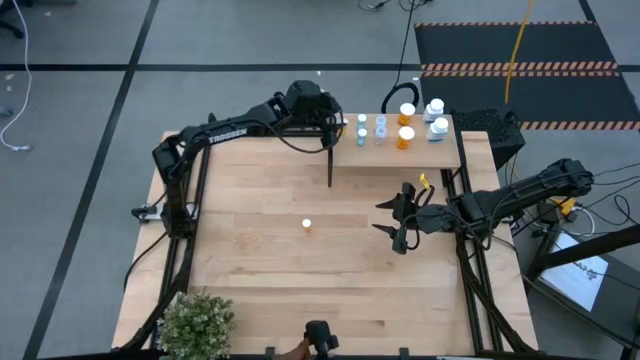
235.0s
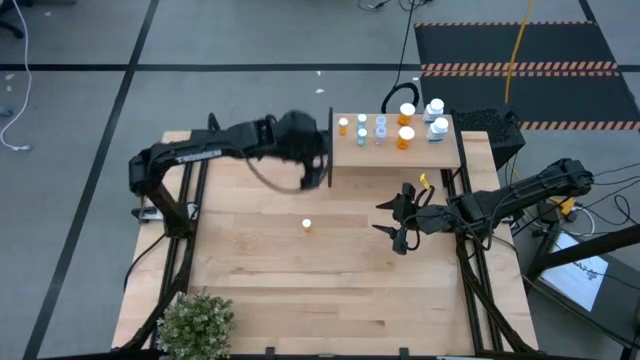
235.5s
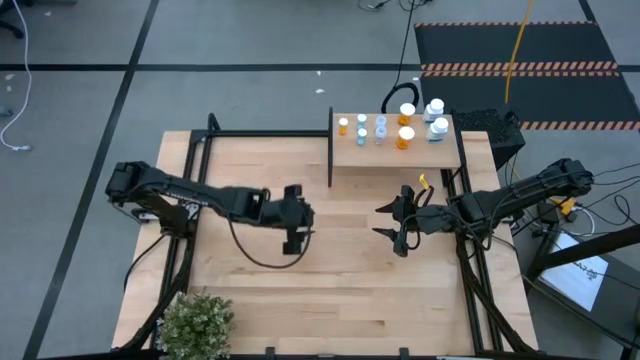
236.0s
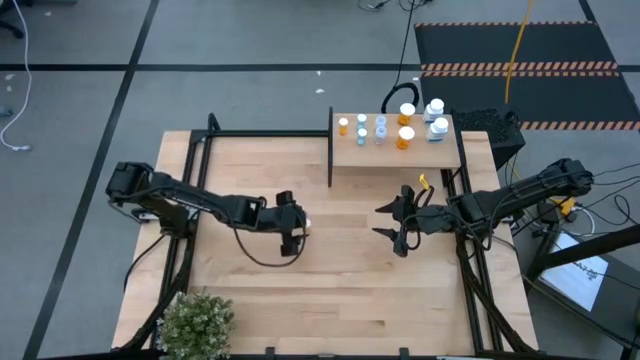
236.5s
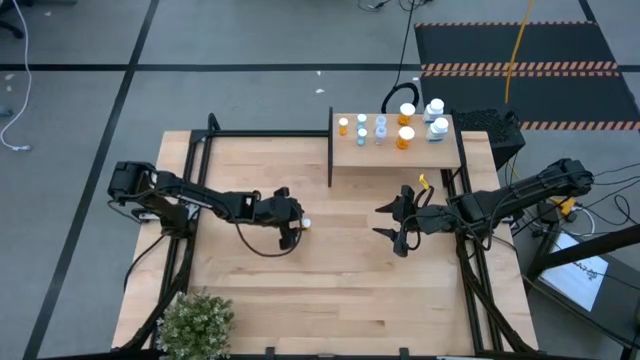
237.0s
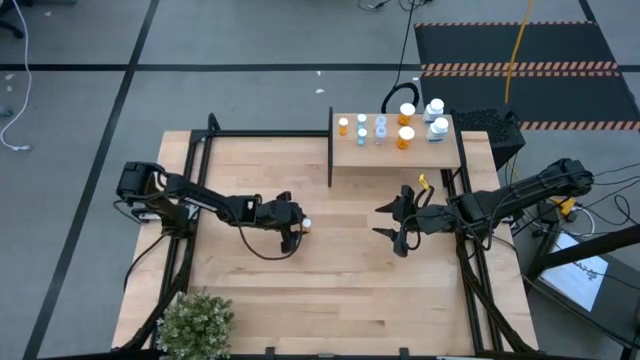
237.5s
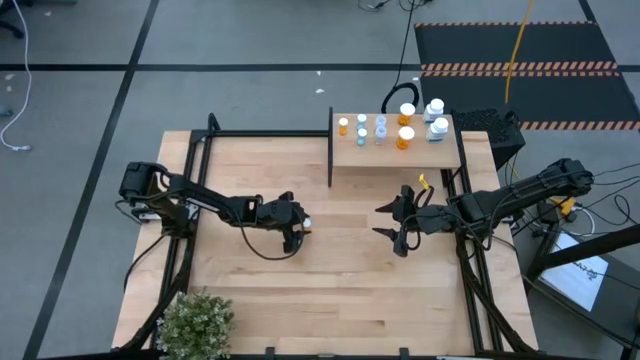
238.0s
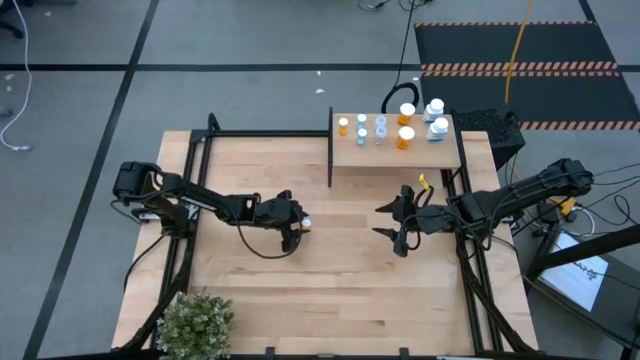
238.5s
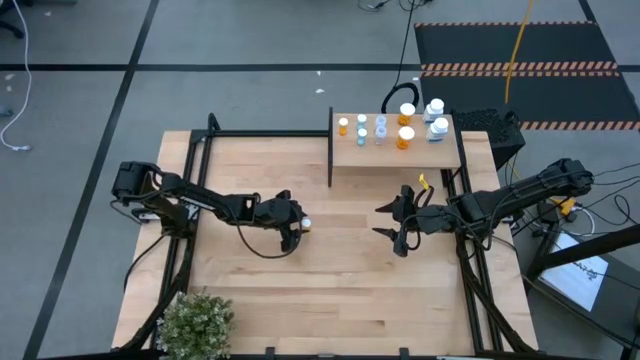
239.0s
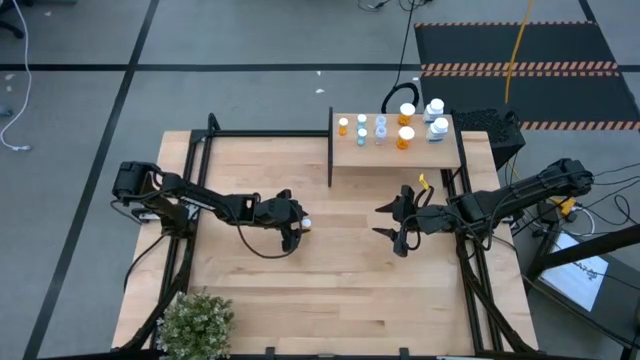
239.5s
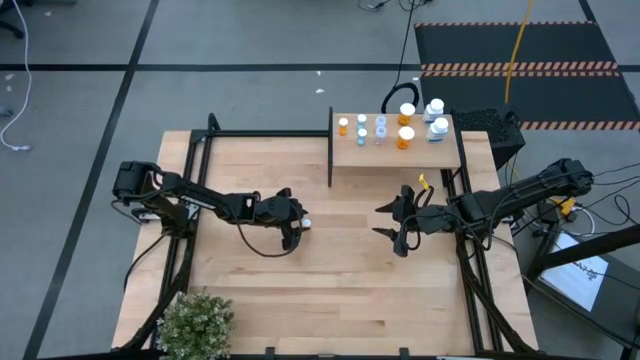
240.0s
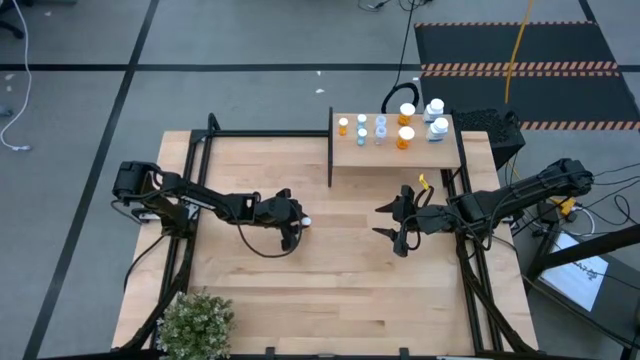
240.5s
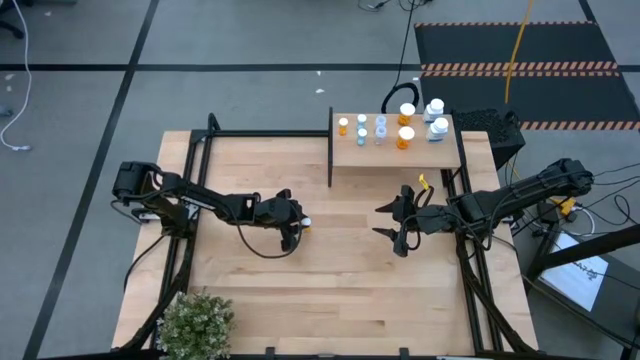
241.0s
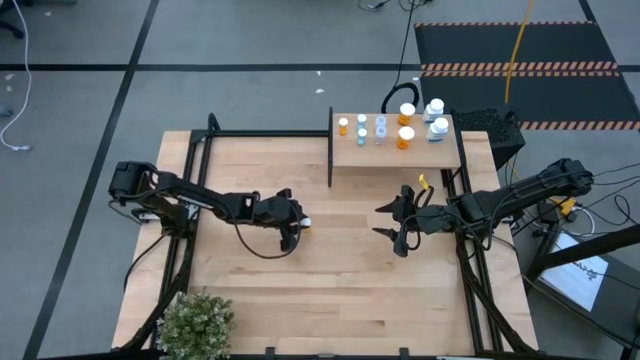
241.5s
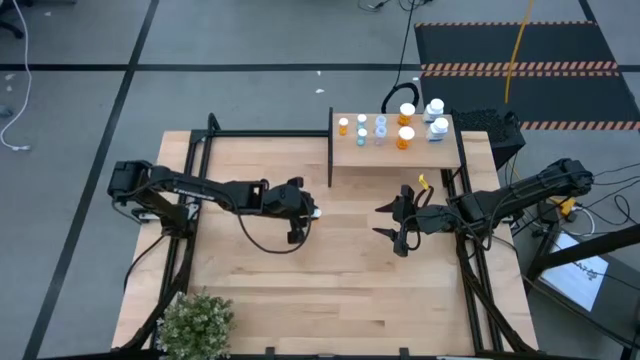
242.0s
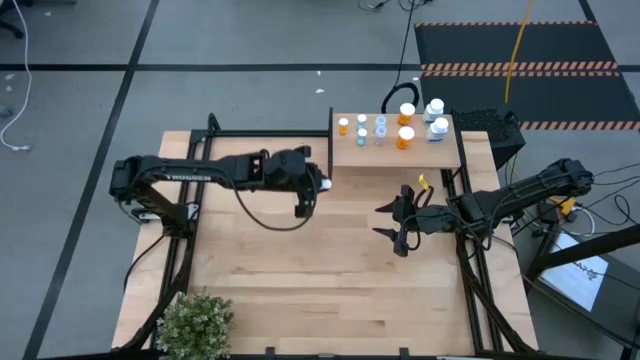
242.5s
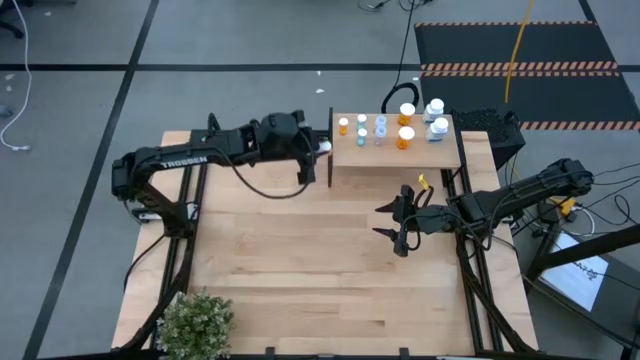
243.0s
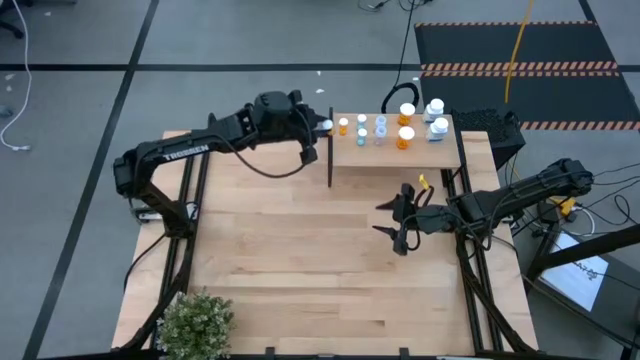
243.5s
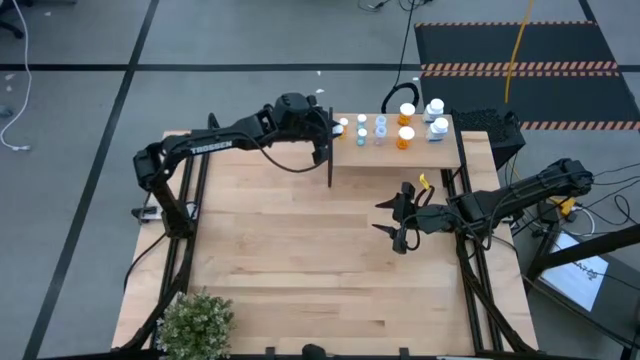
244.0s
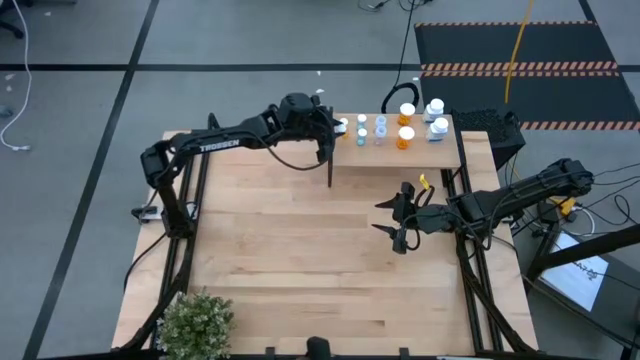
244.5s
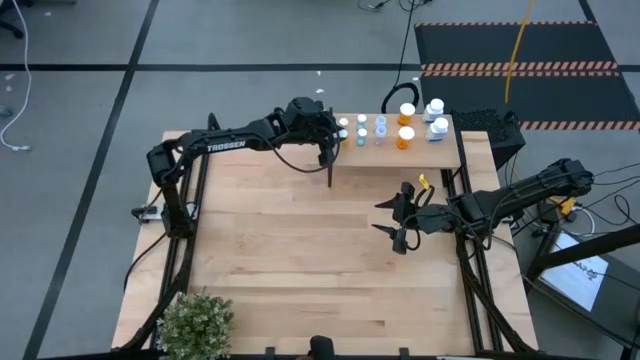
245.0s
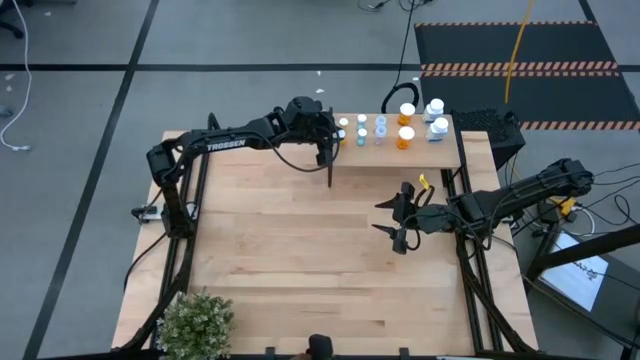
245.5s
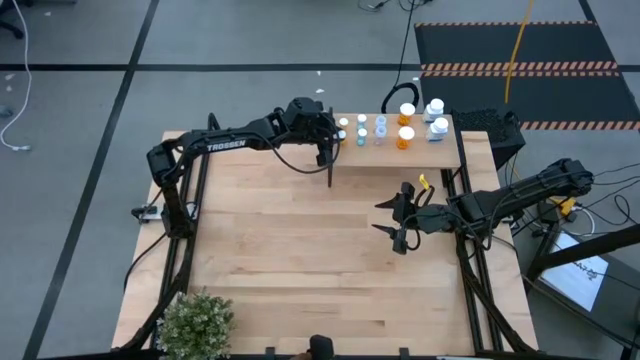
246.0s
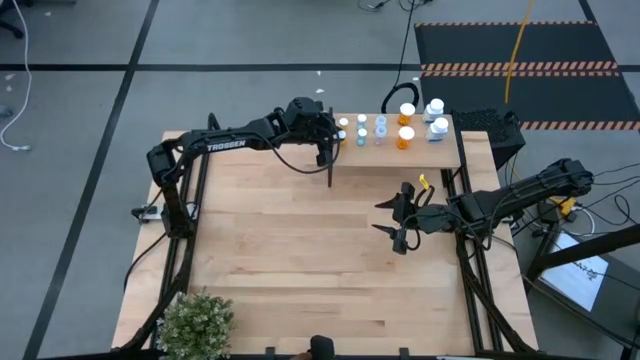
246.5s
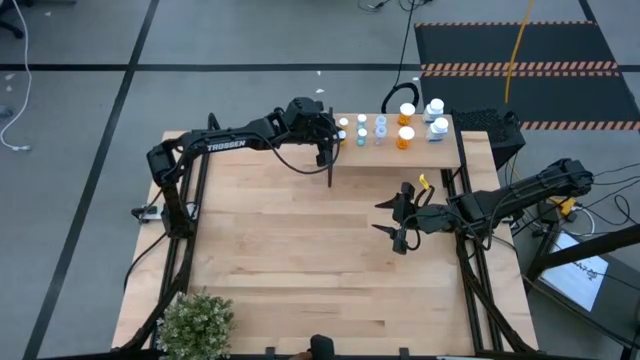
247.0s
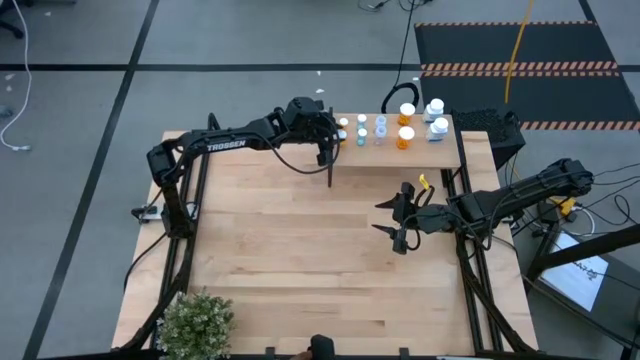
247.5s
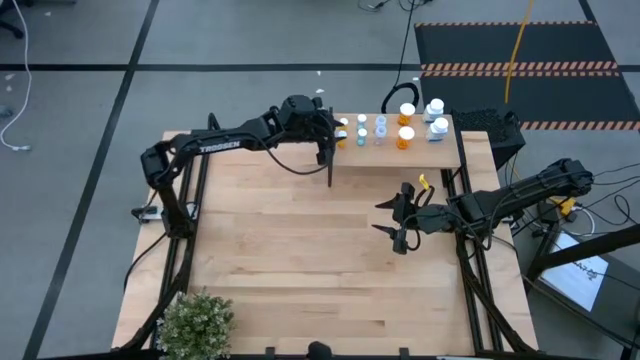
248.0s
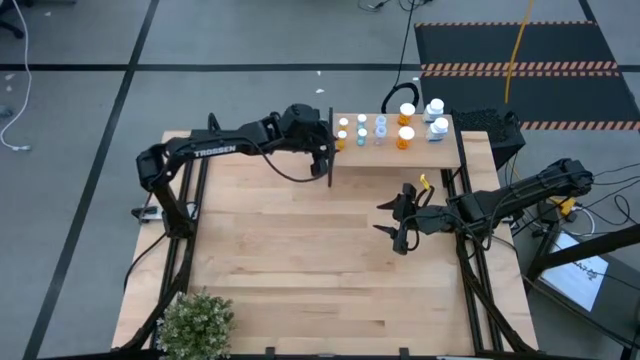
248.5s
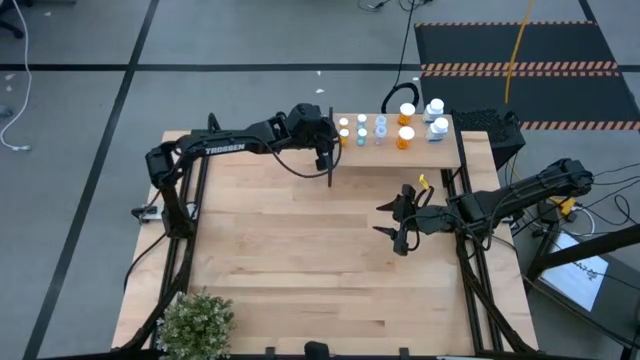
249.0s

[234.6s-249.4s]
Task: Pick and place medicine bottles onto shelf by color
Put the small orange pill bottle on the shelf aligned with the other small orange pill bottle

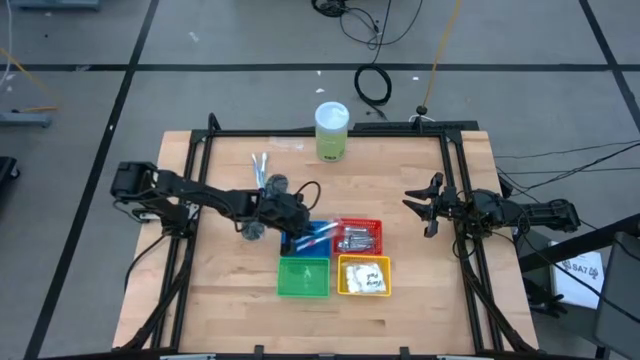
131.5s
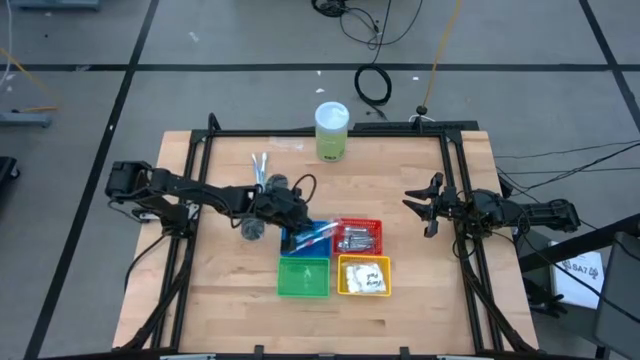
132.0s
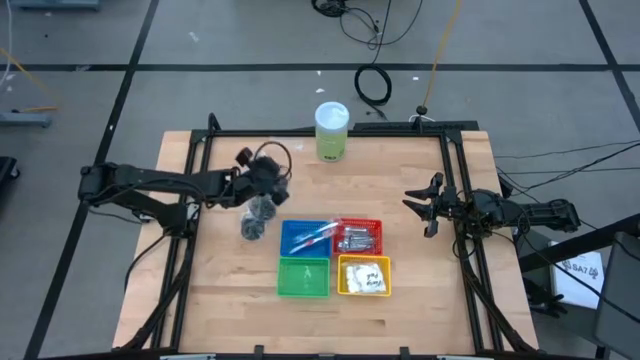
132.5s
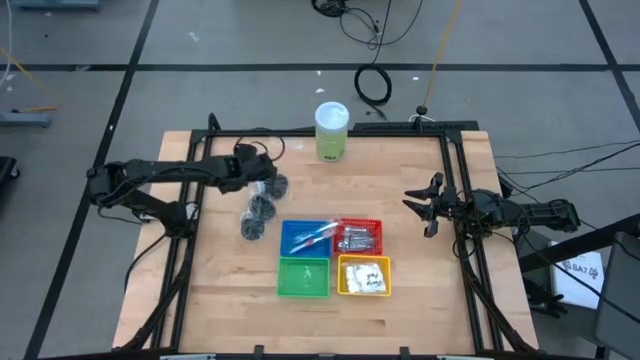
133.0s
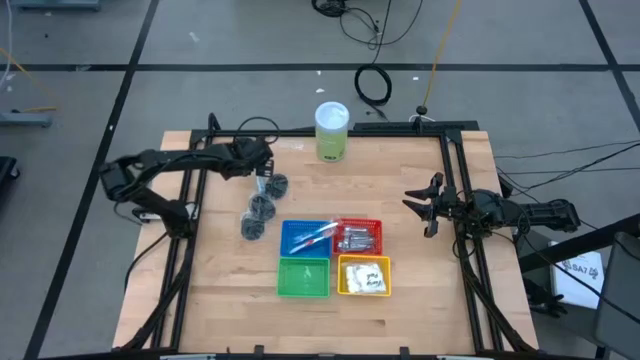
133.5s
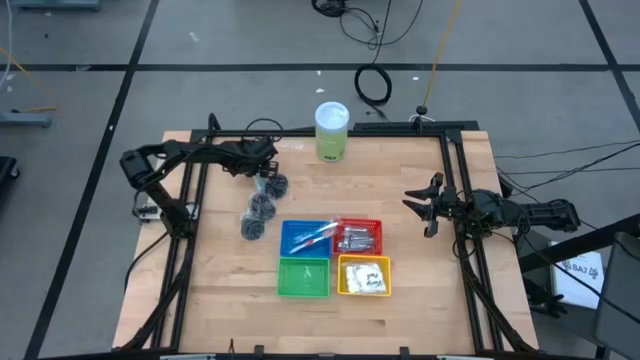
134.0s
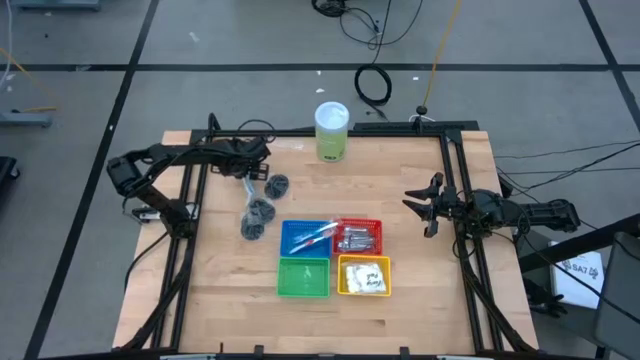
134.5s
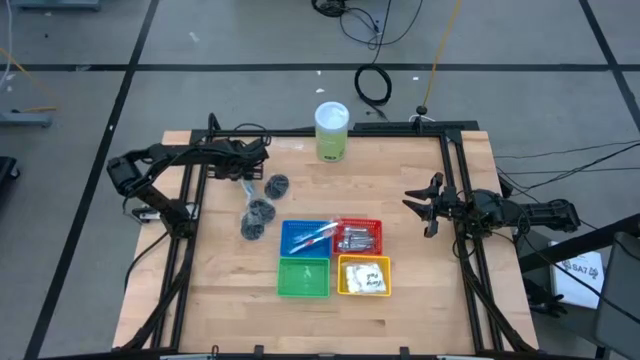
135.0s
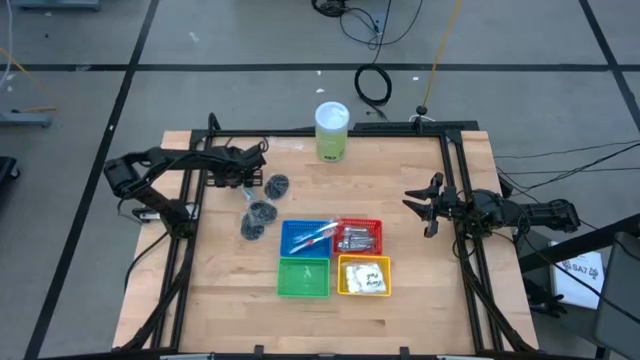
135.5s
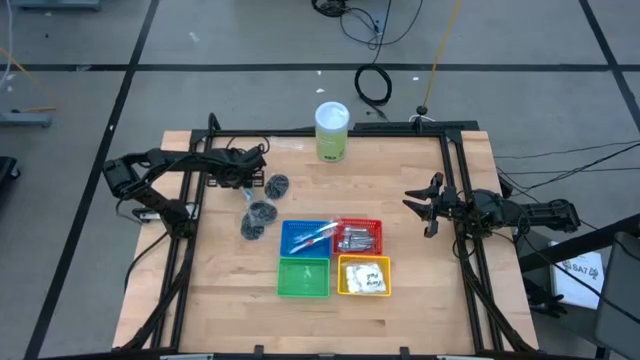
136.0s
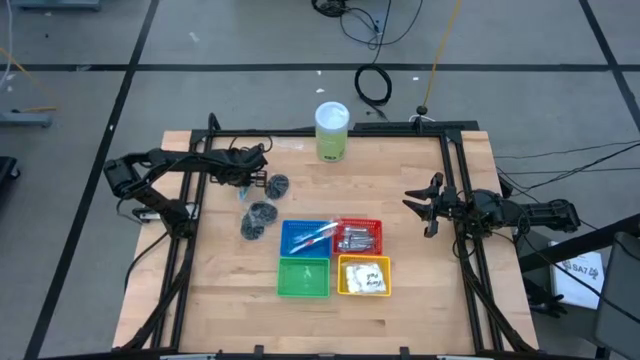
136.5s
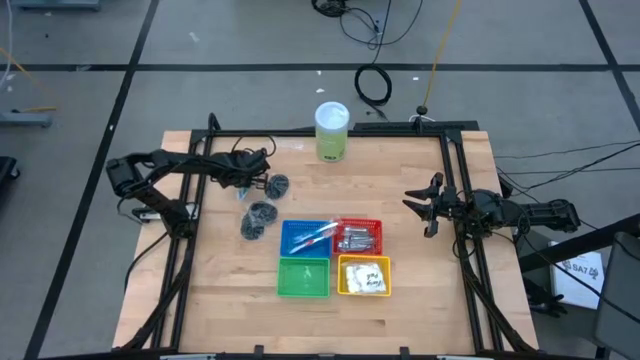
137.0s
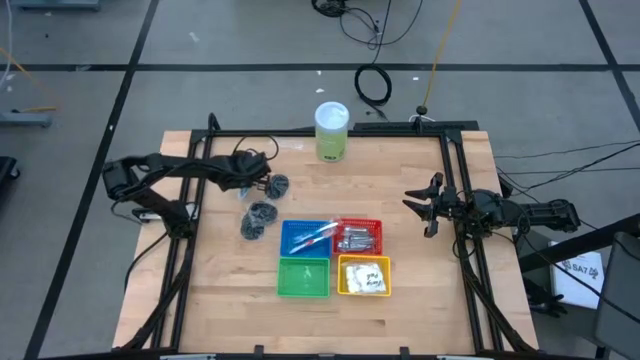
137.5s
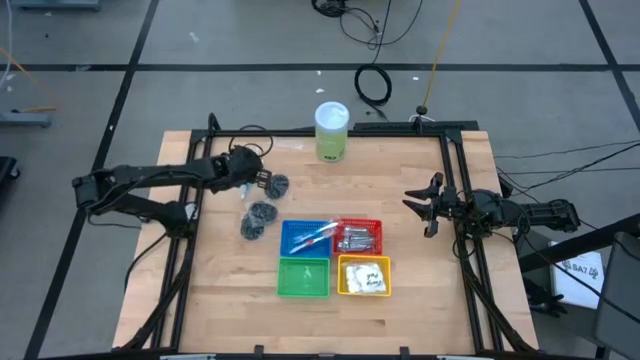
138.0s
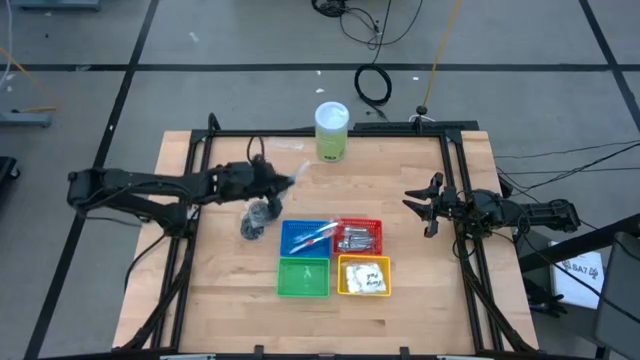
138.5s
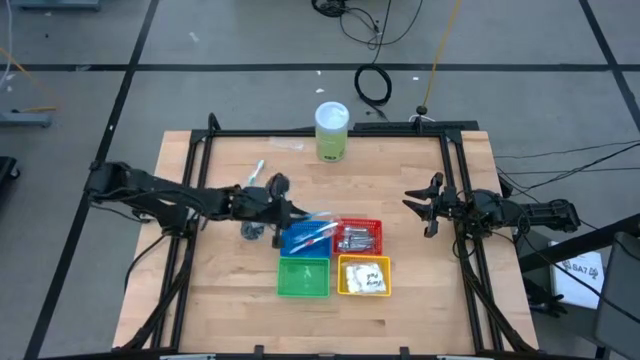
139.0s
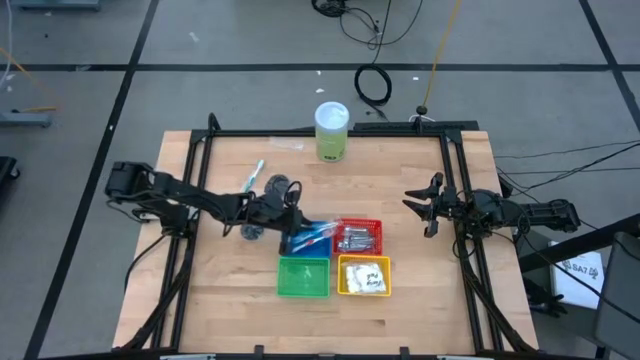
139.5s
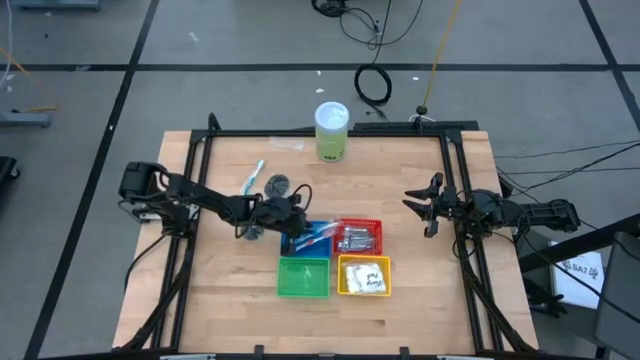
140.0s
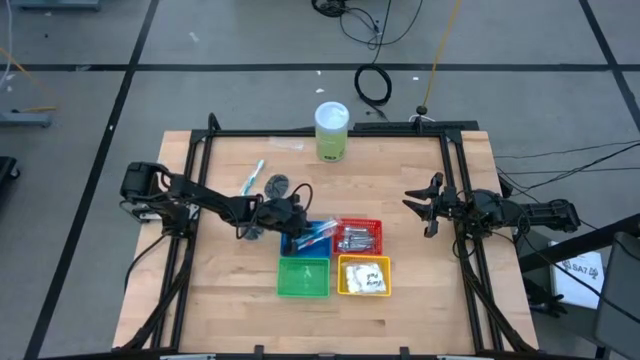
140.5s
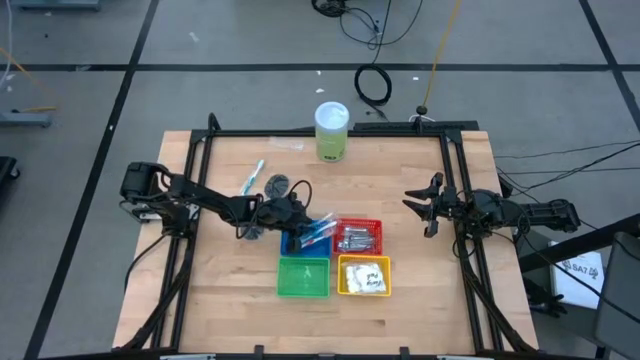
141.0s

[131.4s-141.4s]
Task: Pick & Place Travel size toiletries
Put the blue toothbrush into the blue basket
